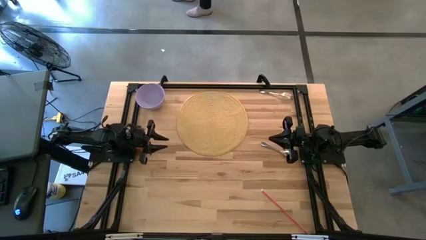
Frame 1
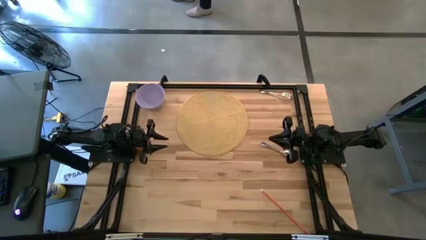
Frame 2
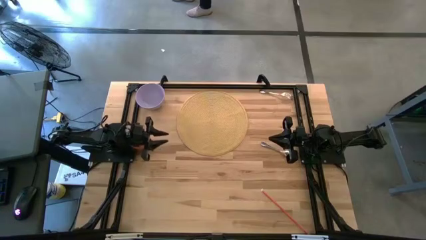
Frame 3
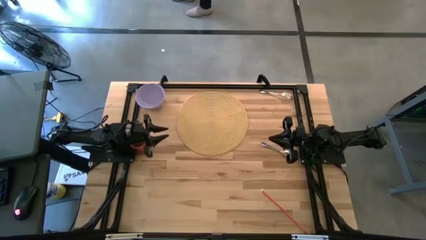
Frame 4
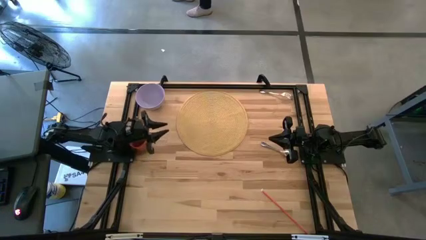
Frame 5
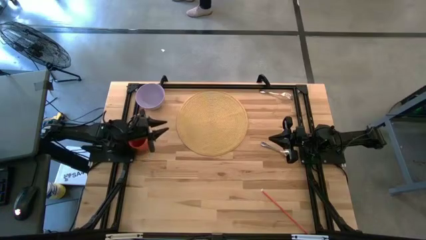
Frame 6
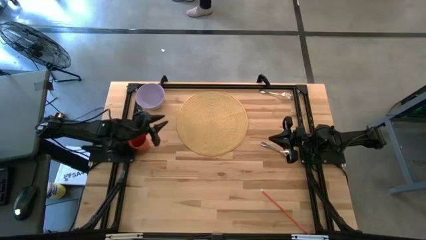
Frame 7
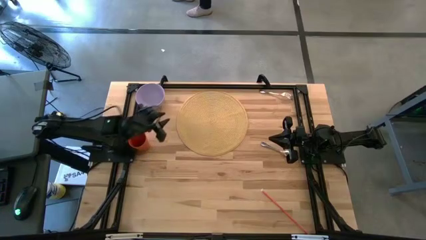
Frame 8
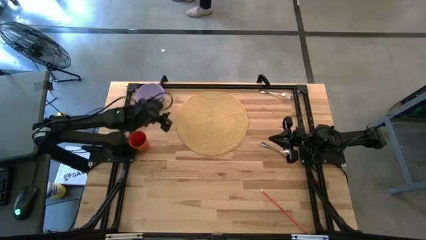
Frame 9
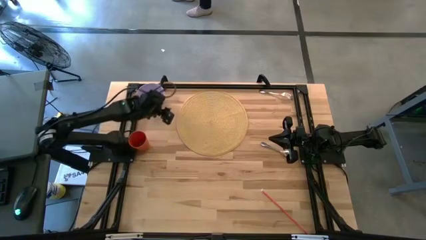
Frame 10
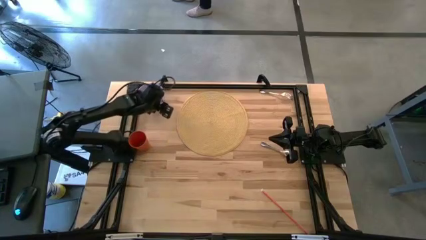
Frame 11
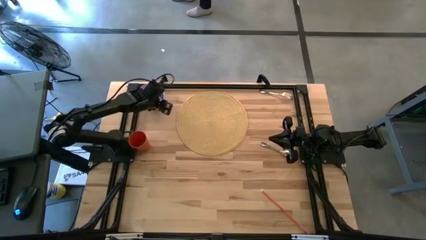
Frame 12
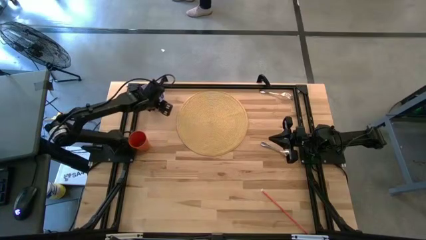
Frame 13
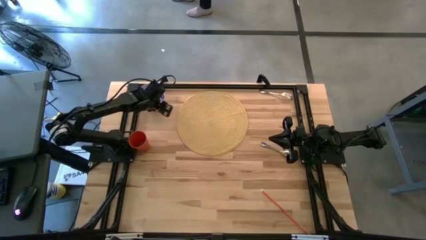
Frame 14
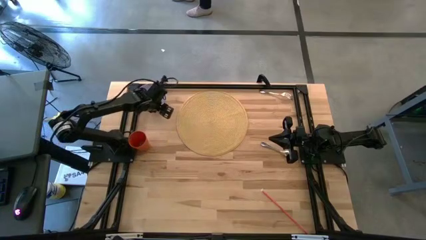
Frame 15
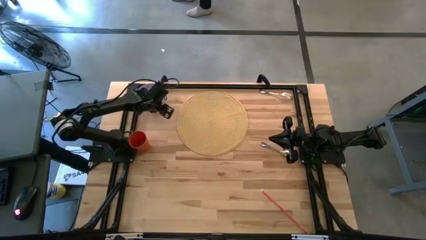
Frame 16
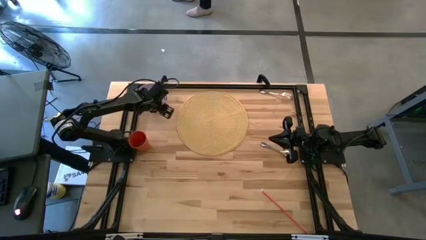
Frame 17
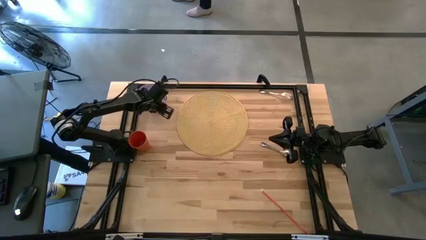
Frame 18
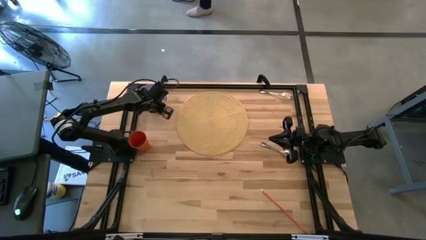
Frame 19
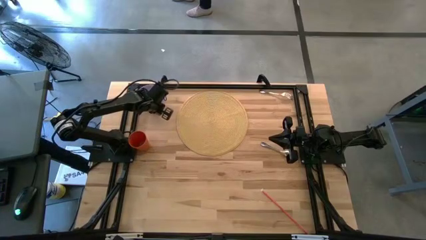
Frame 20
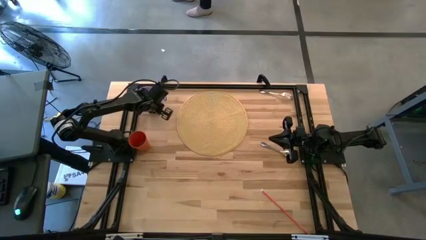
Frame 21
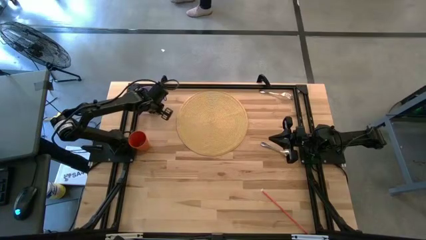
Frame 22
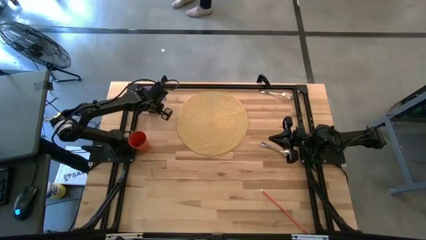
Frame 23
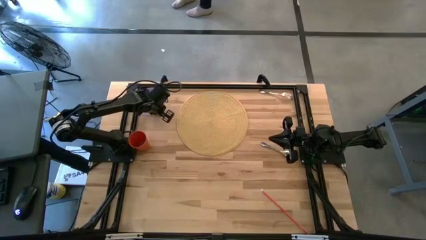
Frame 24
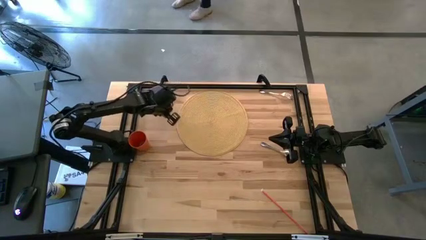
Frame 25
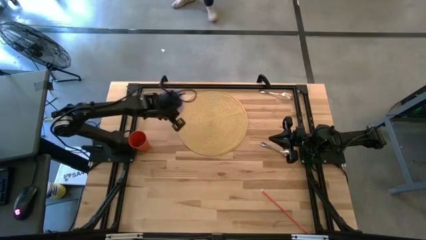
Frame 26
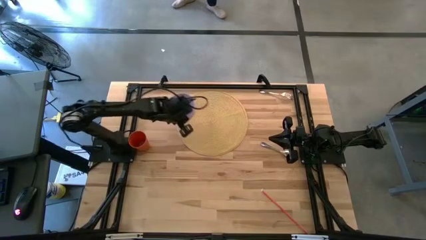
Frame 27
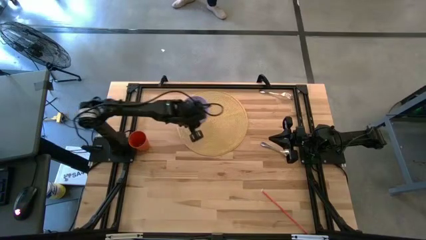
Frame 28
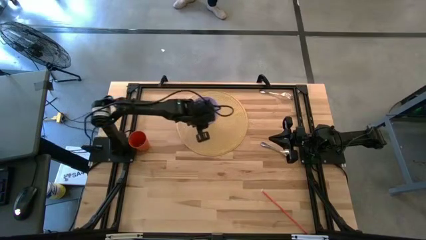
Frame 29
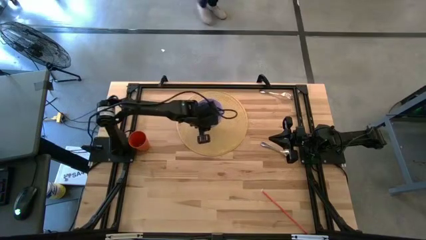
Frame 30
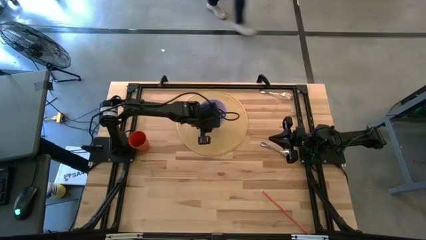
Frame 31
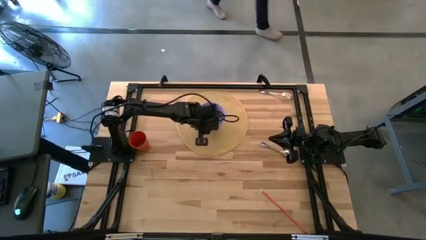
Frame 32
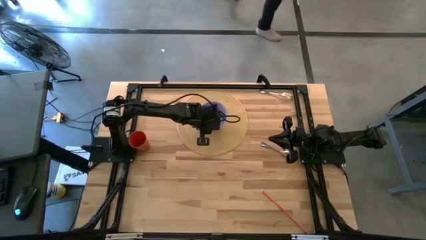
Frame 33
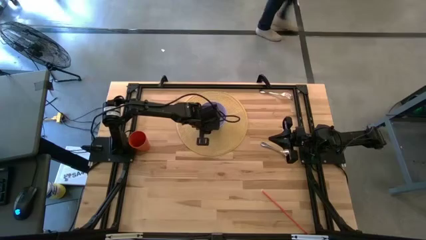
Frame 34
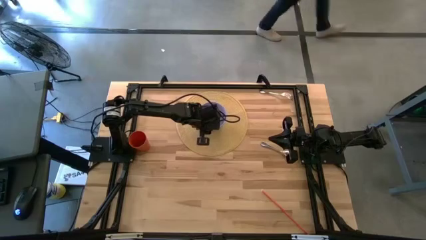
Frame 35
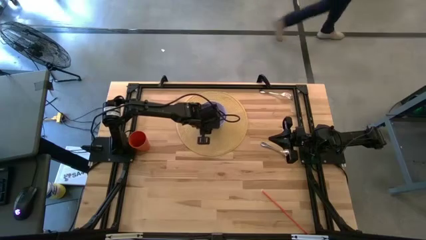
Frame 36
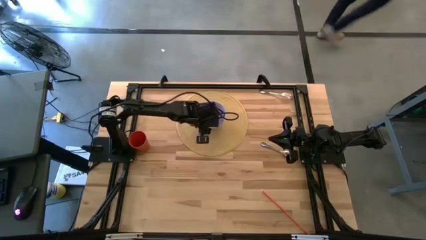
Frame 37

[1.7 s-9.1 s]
Task: Pick & Place Utensil
Put the violet bowl on the yellow placemat

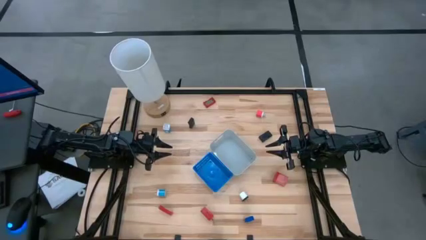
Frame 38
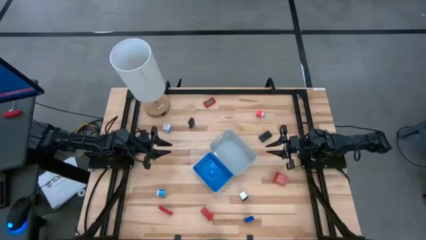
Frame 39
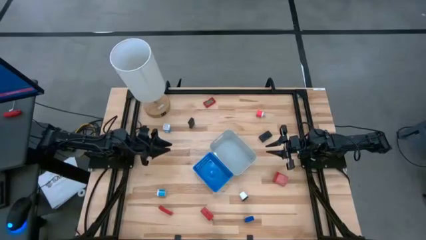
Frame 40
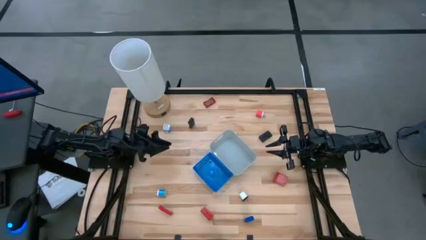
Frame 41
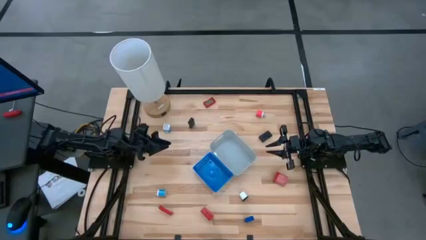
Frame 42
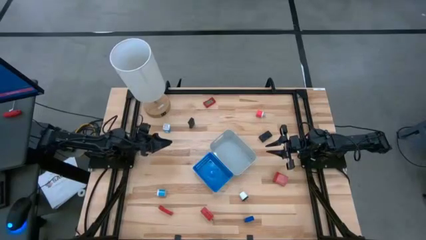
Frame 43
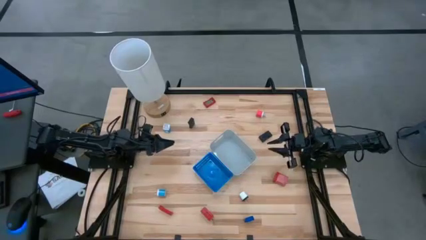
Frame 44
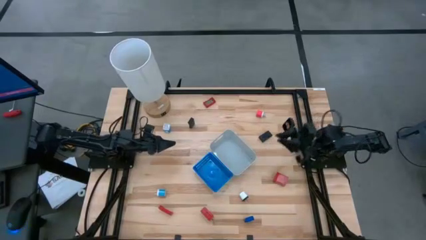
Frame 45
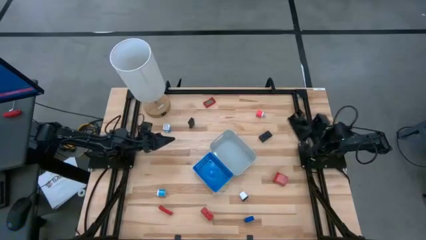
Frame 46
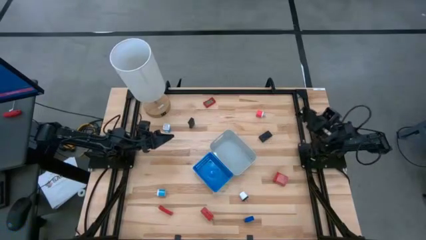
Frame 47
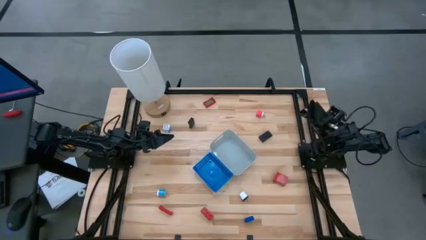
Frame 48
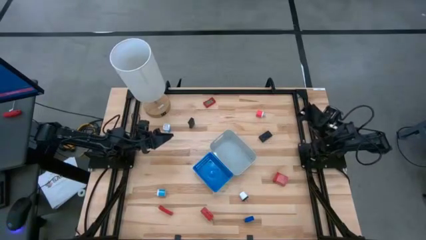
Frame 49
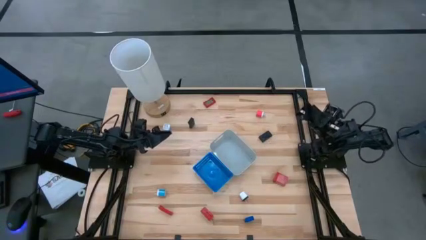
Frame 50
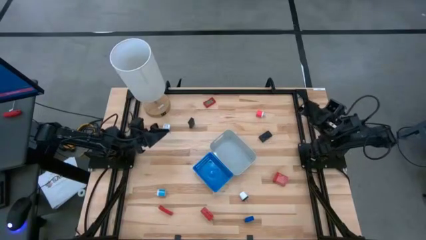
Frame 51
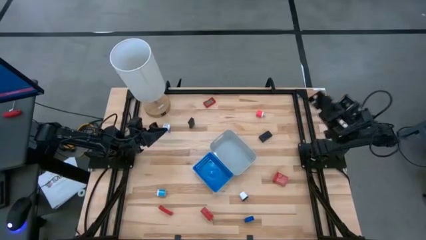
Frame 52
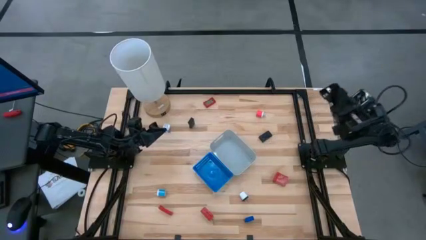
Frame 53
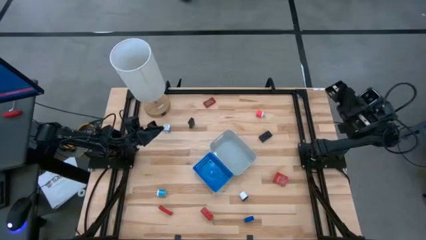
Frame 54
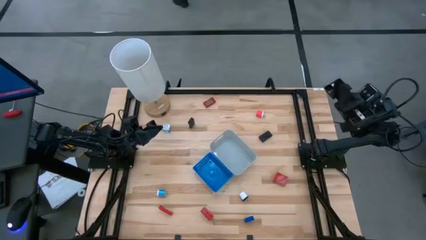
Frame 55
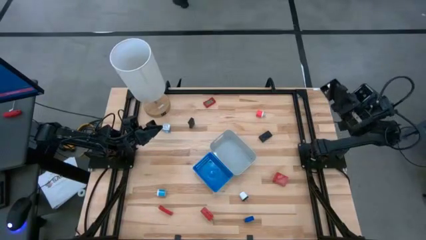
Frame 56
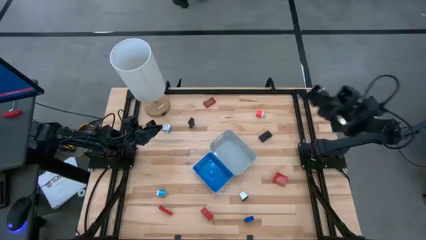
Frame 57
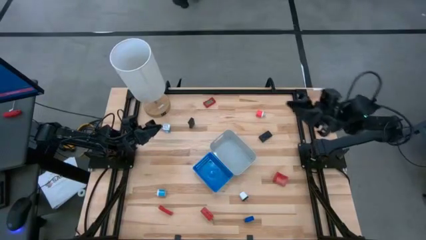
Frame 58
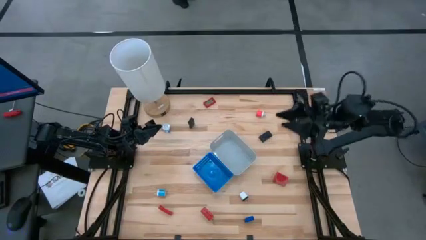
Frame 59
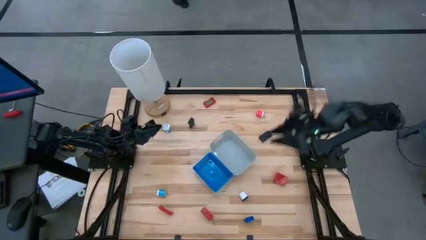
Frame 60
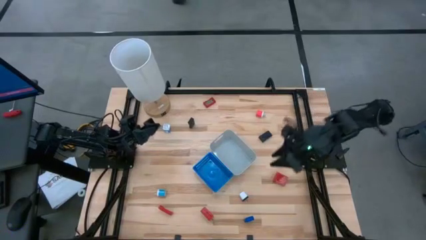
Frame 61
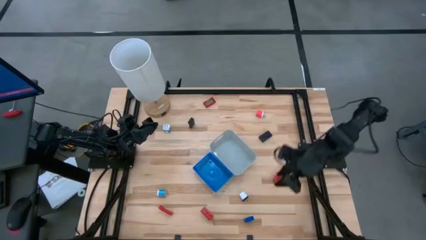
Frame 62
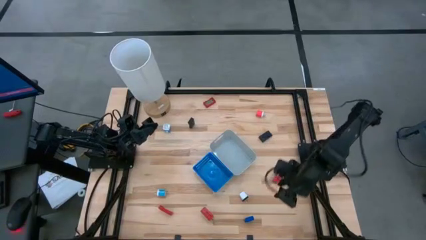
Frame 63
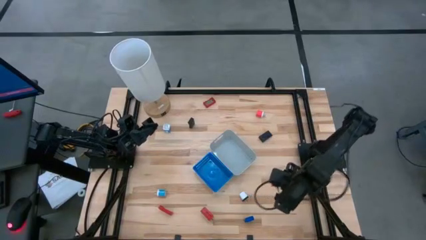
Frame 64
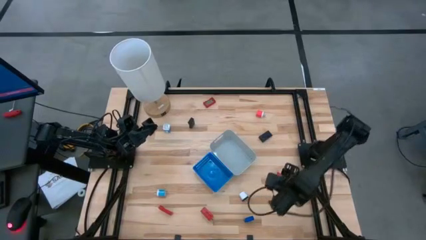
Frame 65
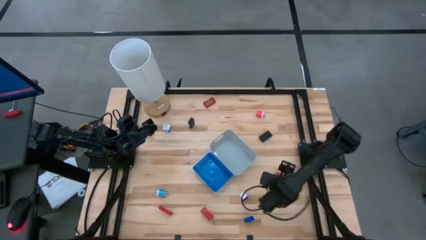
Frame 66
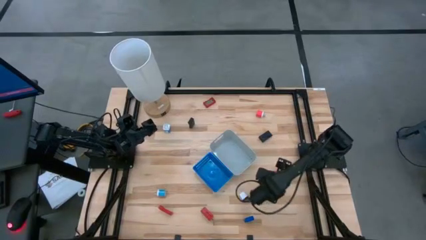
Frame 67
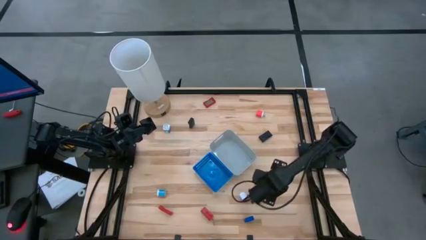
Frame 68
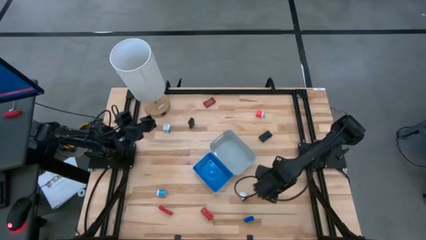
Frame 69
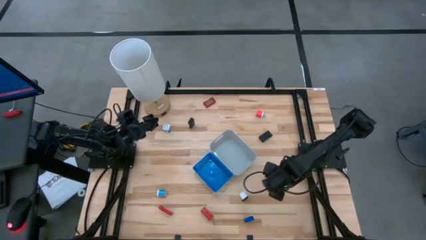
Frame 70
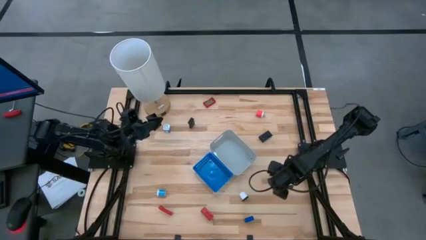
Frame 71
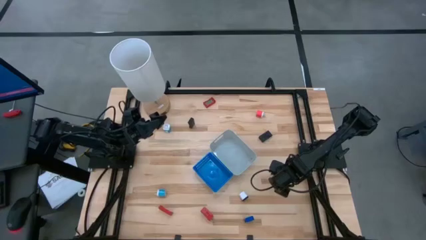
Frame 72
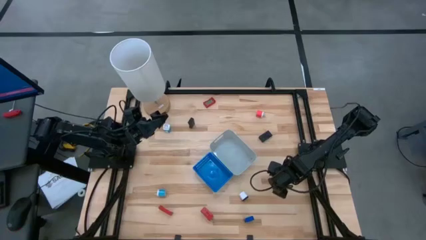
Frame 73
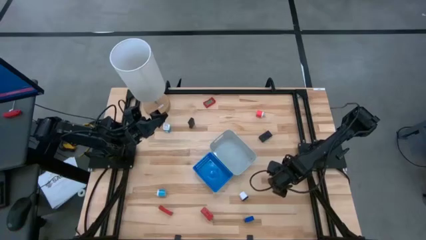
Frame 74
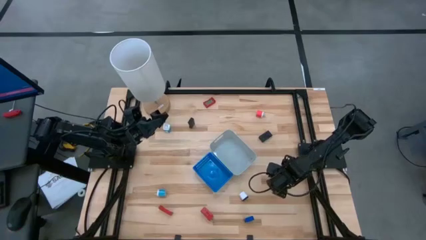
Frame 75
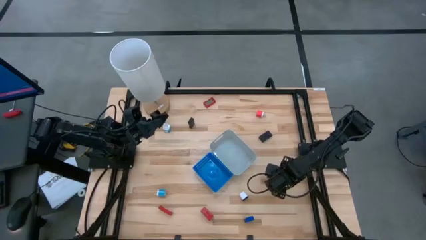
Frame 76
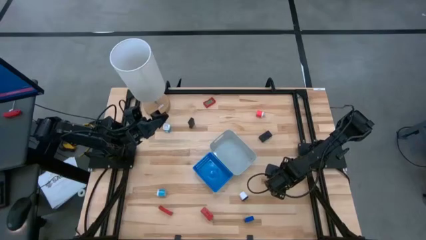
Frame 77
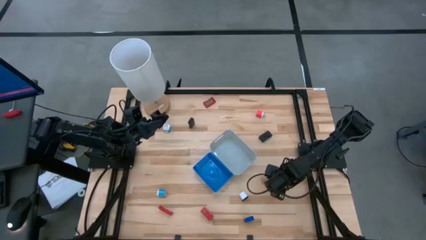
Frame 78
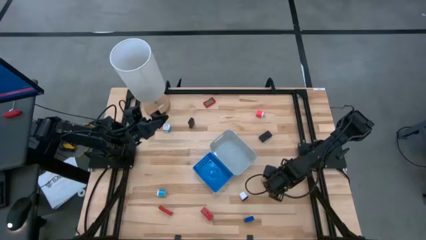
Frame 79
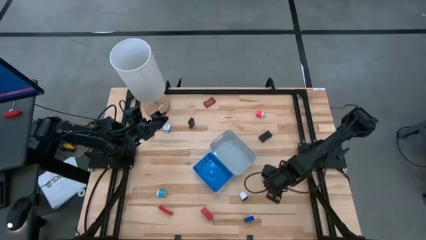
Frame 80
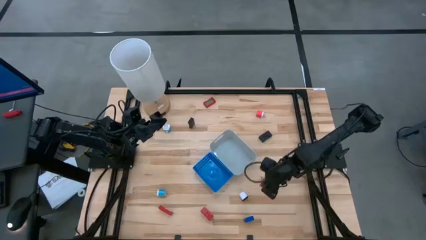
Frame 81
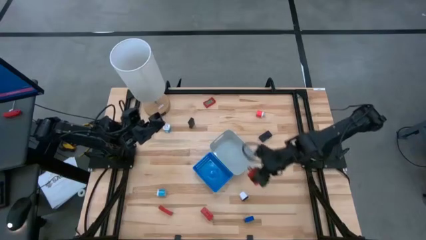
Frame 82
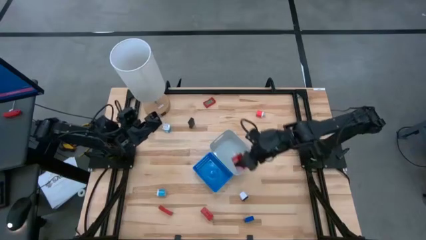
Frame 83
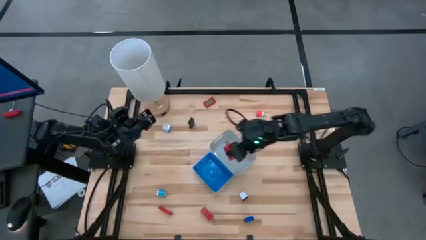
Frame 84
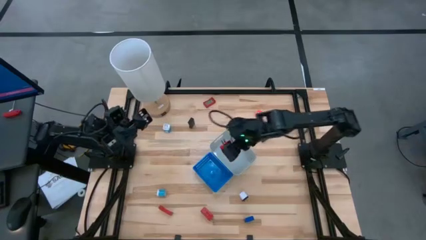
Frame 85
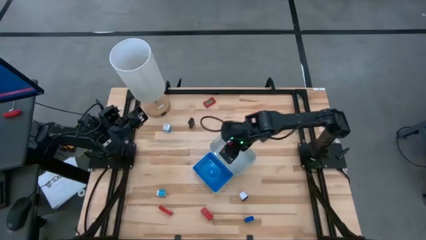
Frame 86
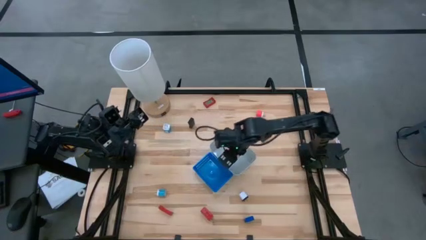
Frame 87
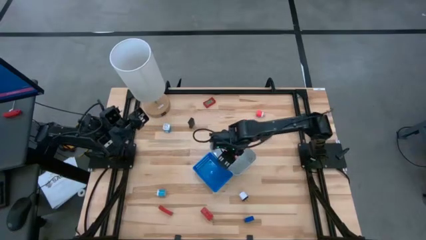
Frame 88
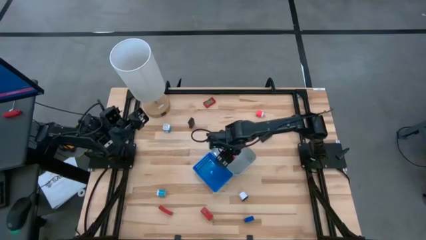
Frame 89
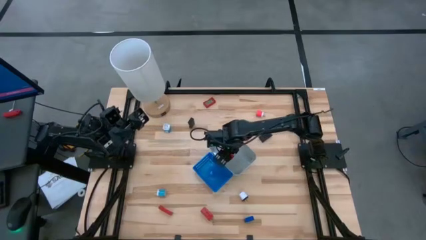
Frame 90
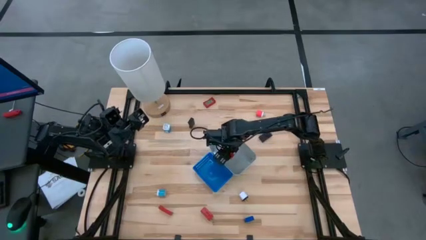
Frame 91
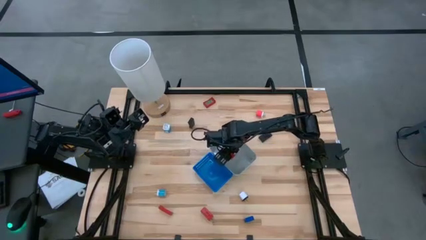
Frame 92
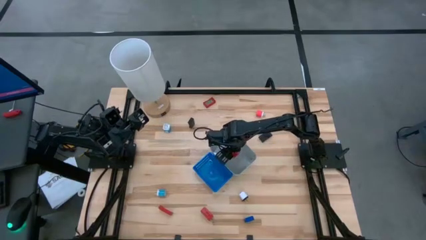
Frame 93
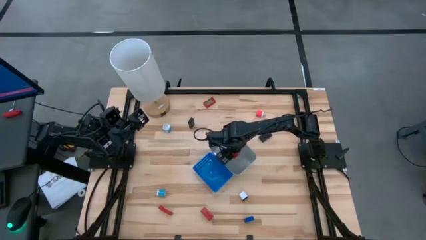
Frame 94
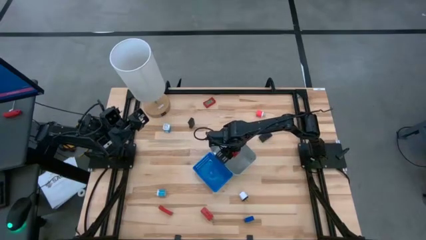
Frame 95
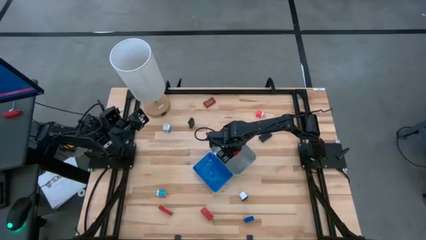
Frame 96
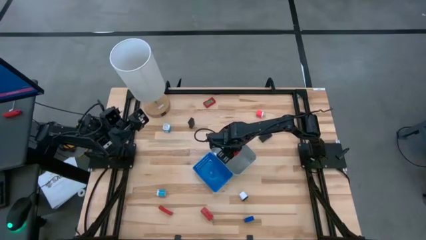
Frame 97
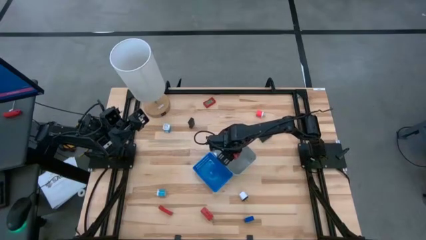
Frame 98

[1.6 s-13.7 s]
Task: Pick & Place Office items
Put the right red charger adapter into the gray bin
